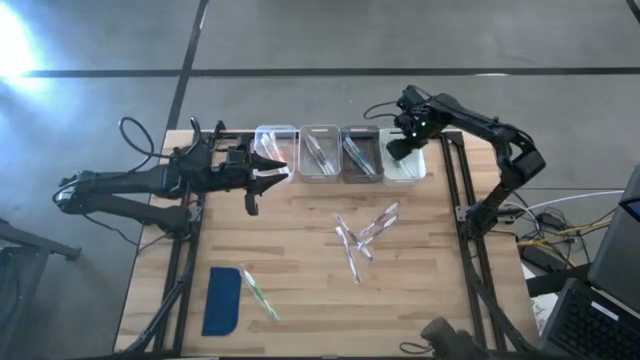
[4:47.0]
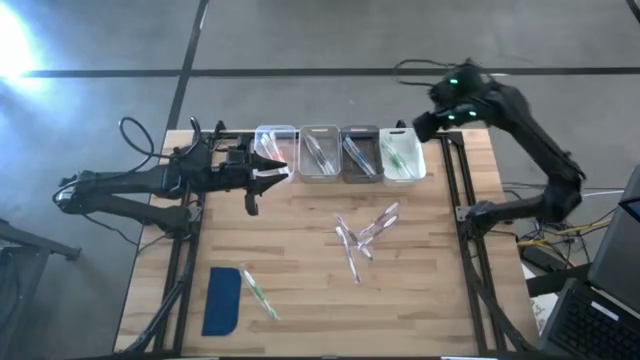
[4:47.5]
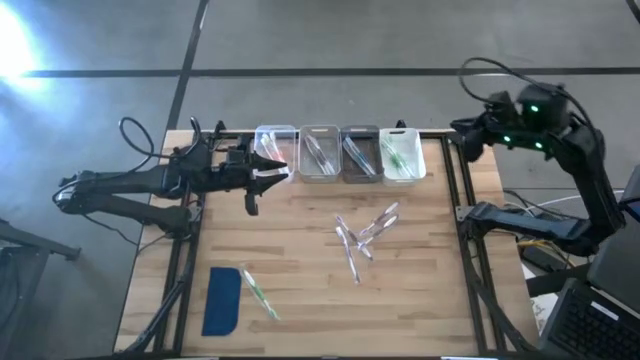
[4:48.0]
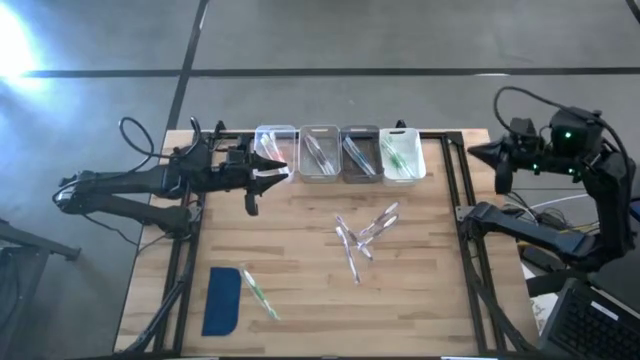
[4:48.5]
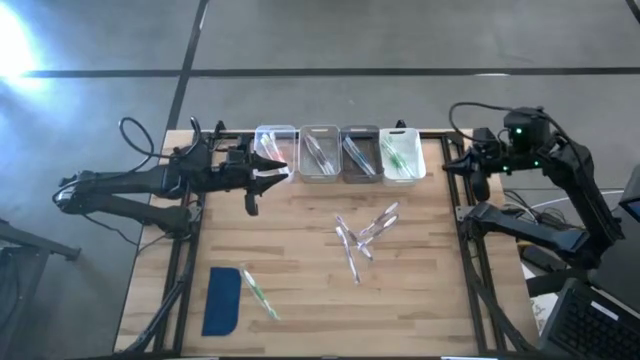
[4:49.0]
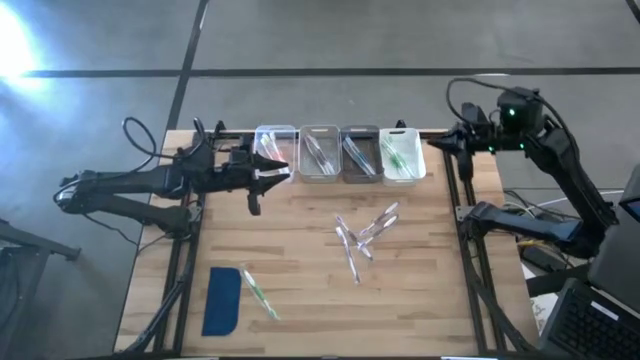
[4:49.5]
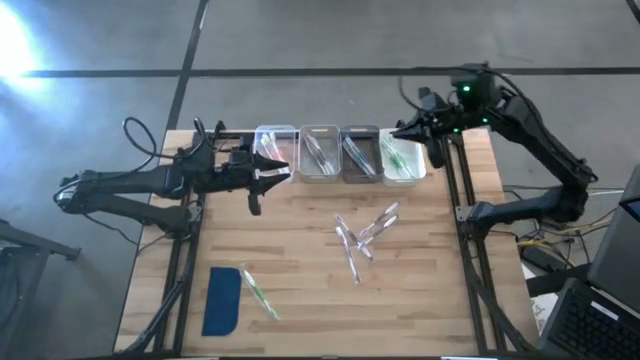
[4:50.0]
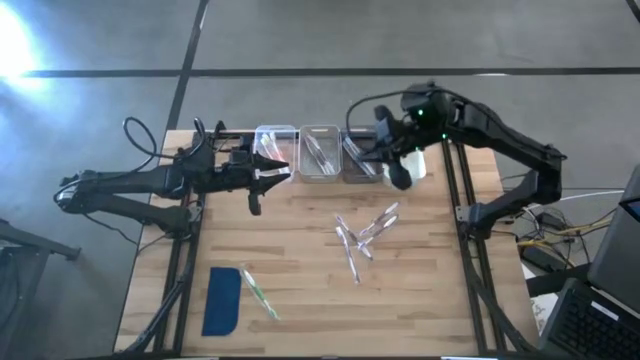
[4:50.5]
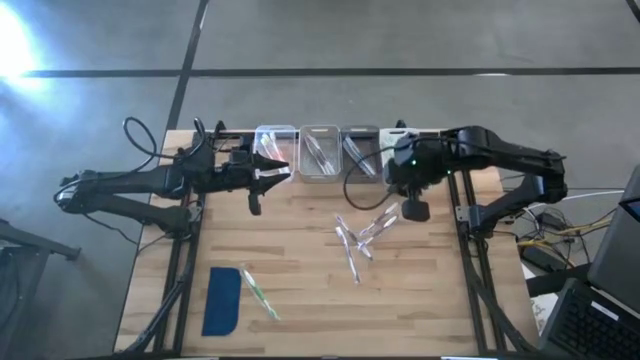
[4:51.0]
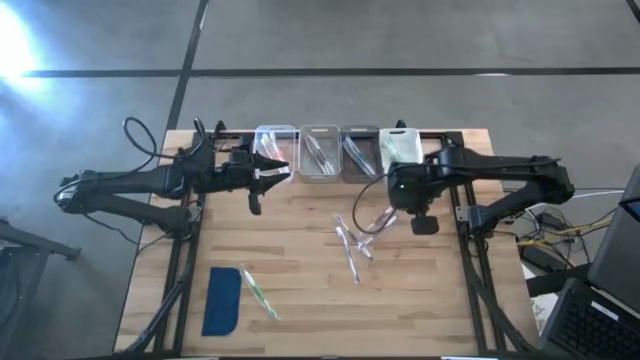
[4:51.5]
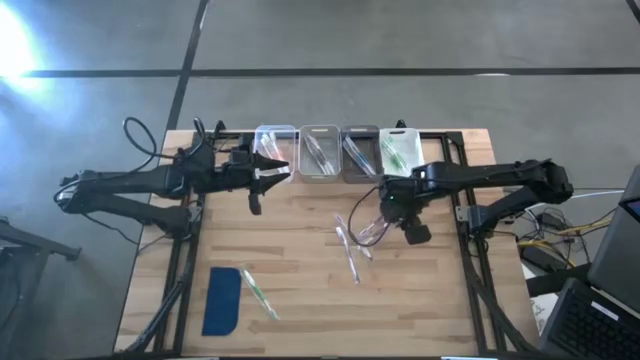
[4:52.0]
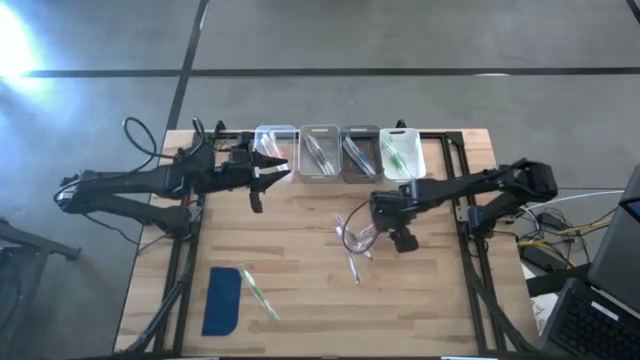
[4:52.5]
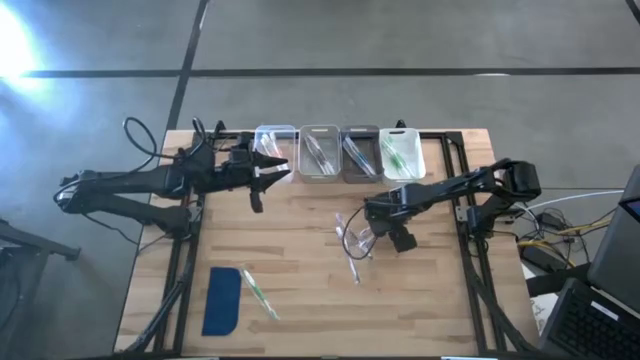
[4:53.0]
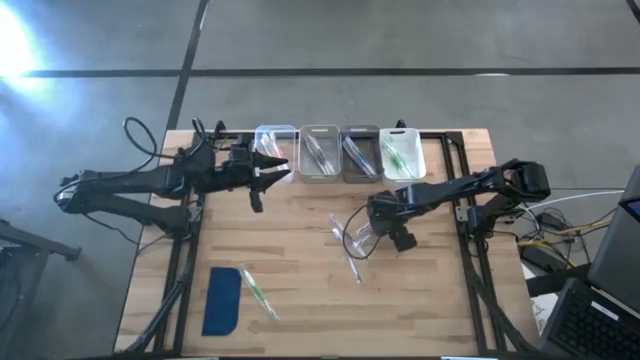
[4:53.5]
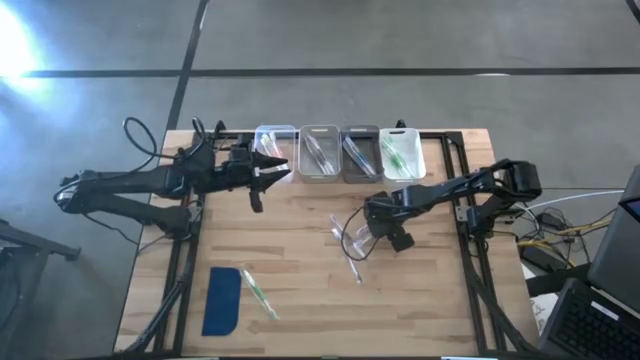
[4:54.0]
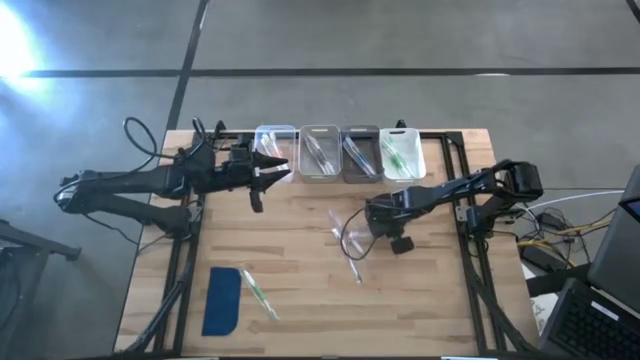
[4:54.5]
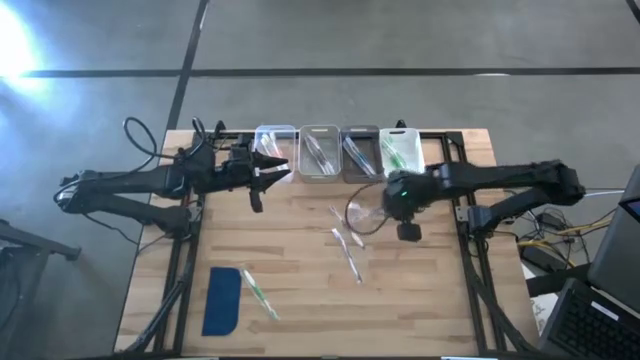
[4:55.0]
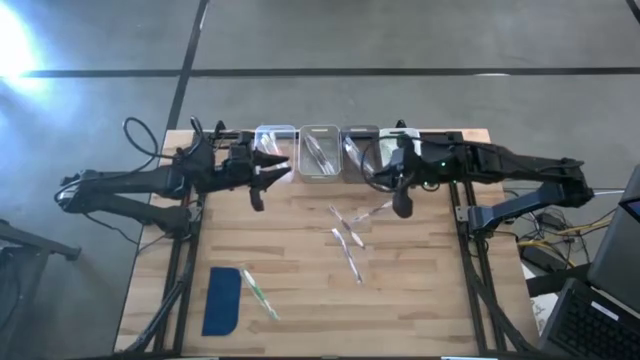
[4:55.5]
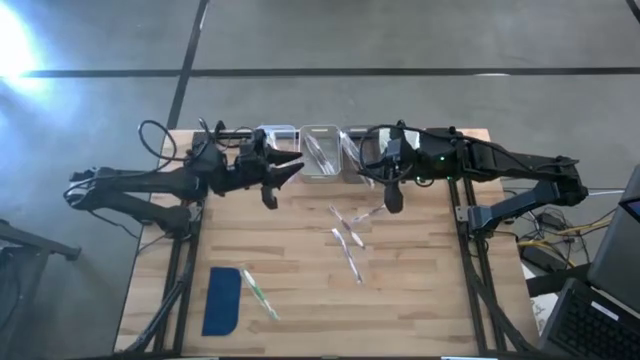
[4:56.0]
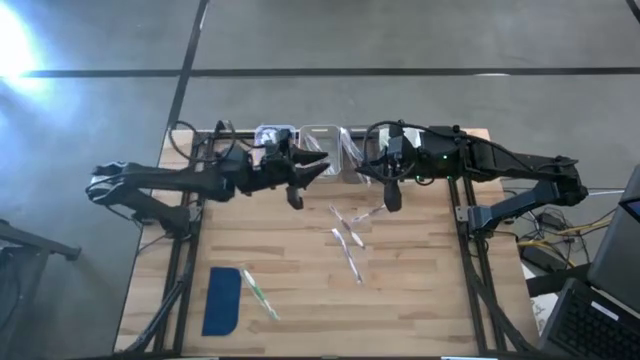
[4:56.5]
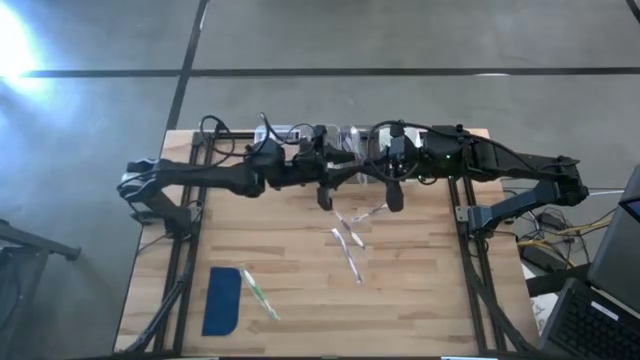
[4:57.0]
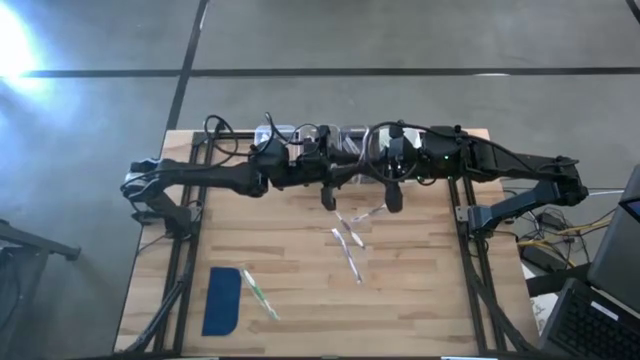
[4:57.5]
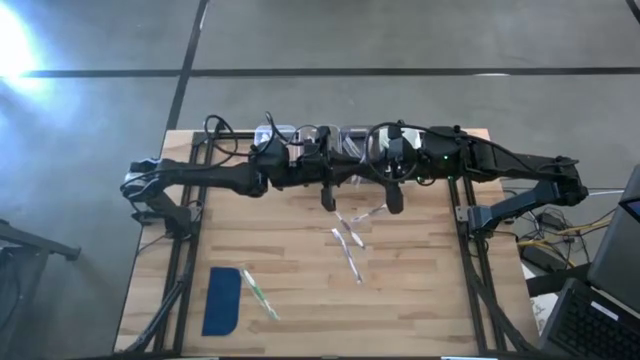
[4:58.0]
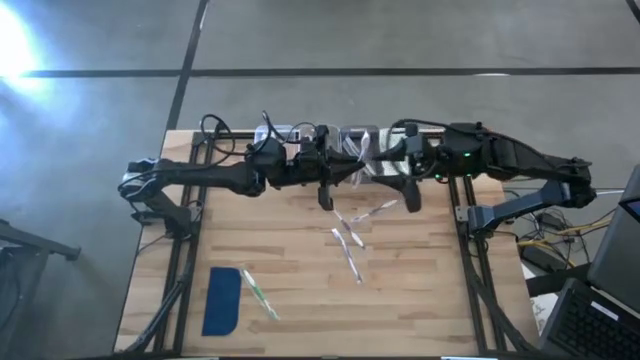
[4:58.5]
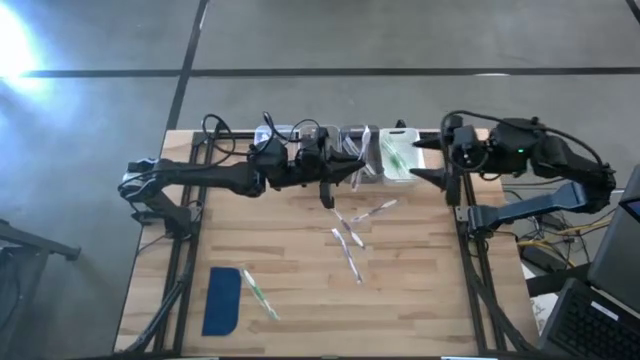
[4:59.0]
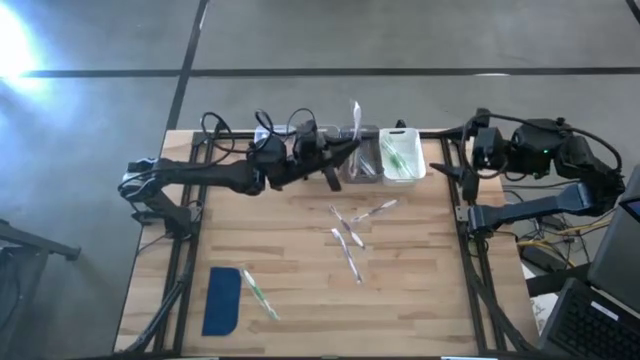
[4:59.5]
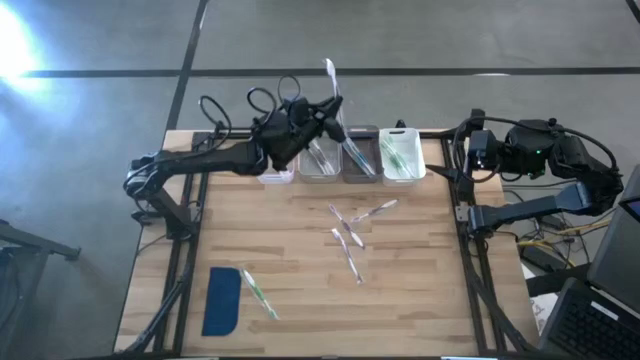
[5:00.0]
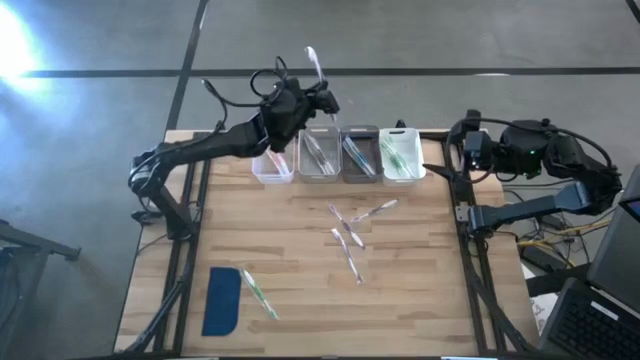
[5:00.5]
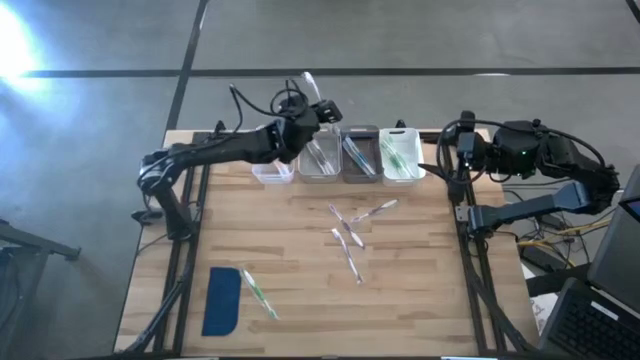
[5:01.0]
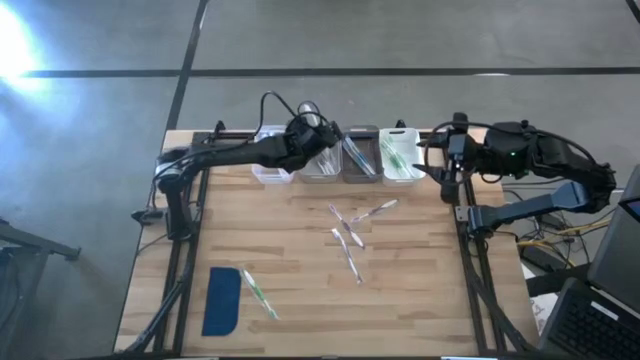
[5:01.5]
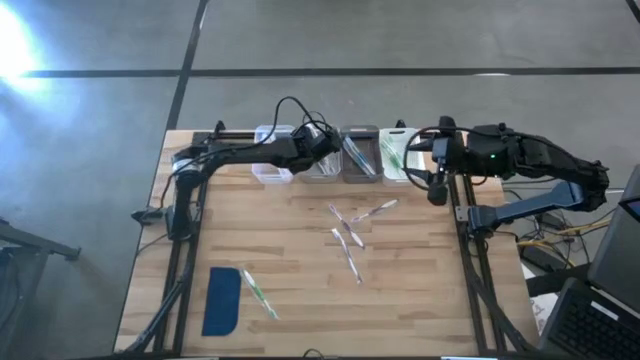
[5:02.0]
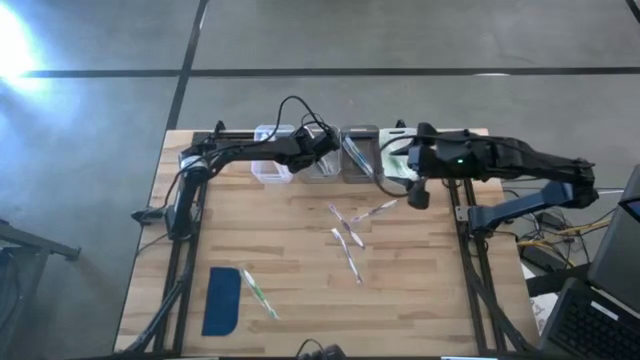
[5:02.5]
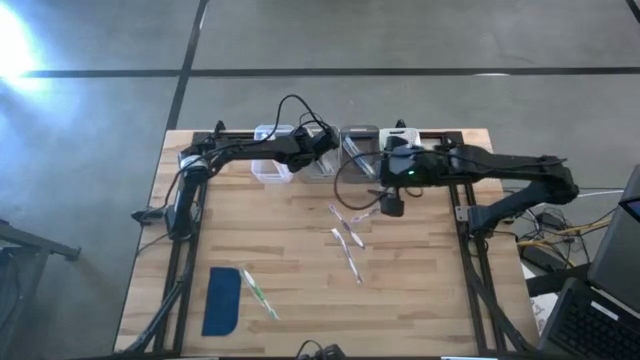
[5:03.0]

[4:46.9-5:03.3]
Task: Pick & Place Toothbrushes
Put the purple toothbrush into the gray bin

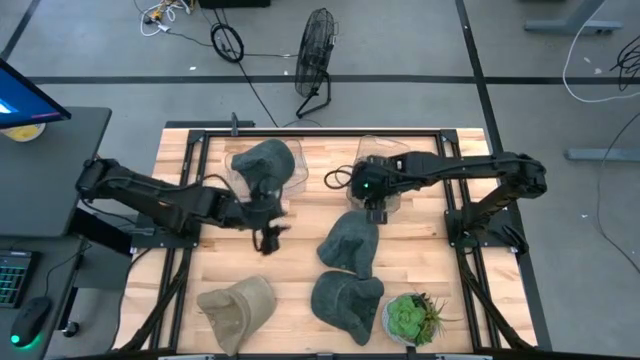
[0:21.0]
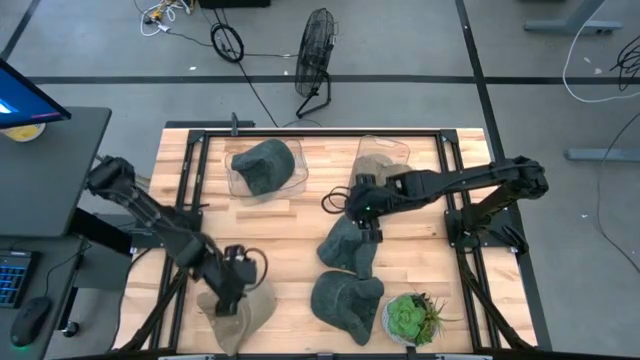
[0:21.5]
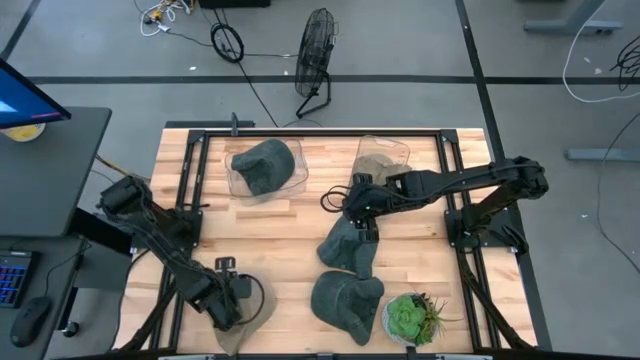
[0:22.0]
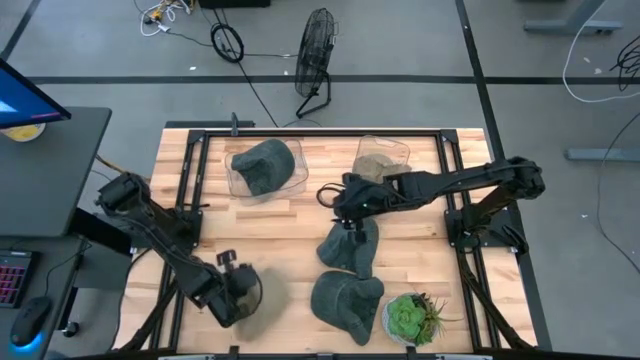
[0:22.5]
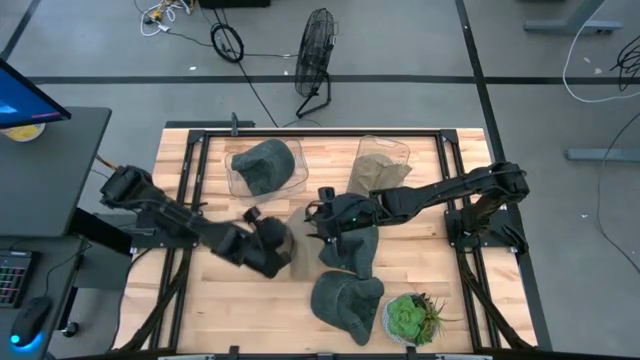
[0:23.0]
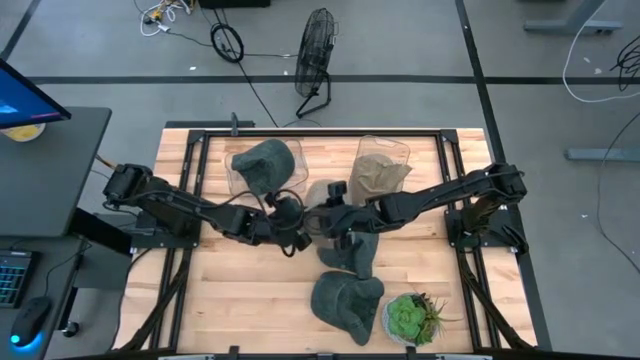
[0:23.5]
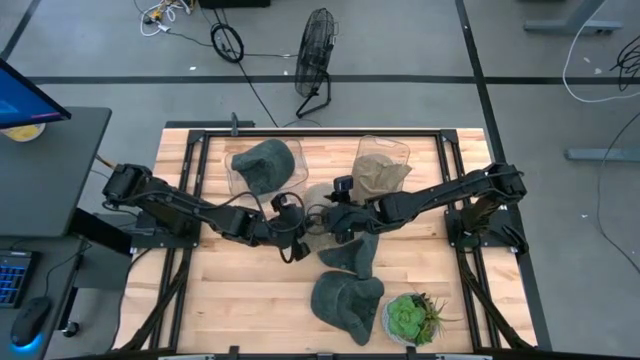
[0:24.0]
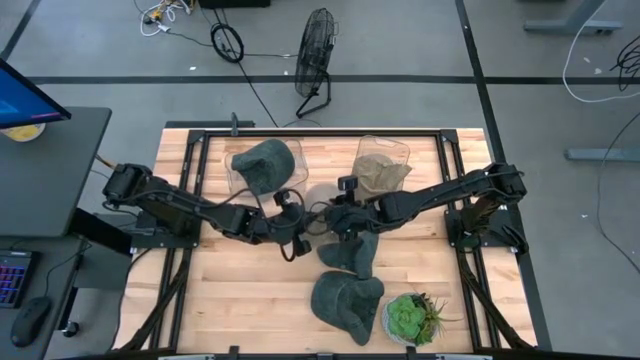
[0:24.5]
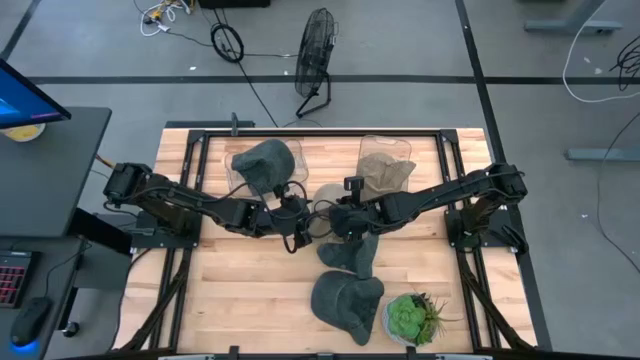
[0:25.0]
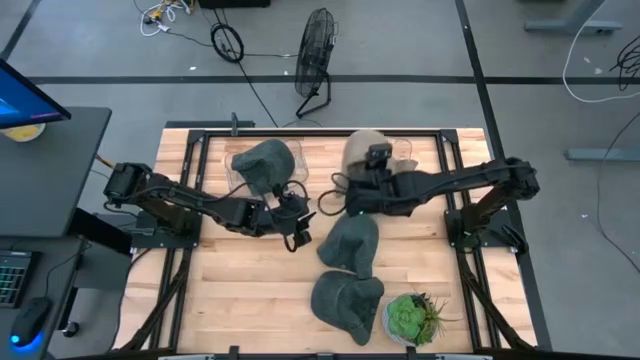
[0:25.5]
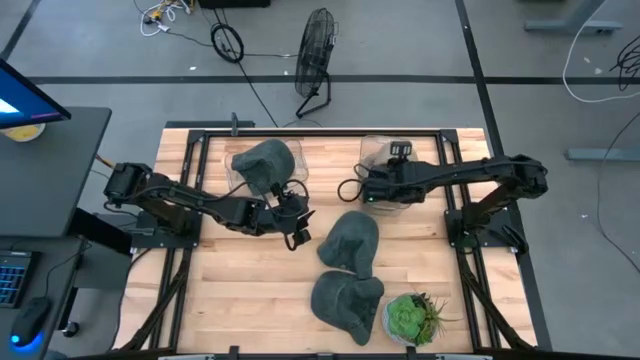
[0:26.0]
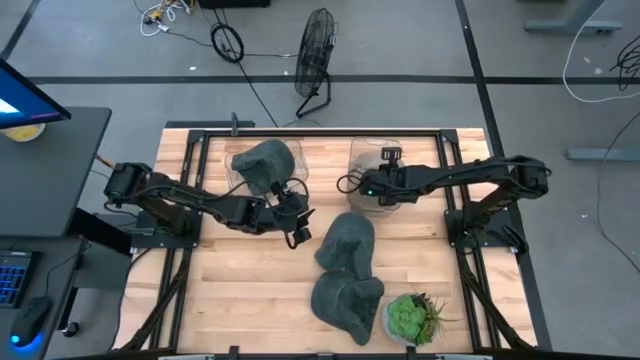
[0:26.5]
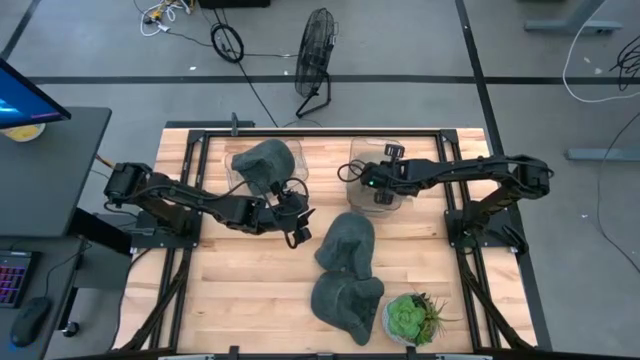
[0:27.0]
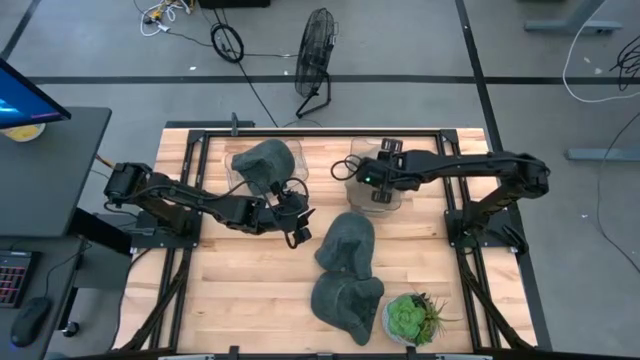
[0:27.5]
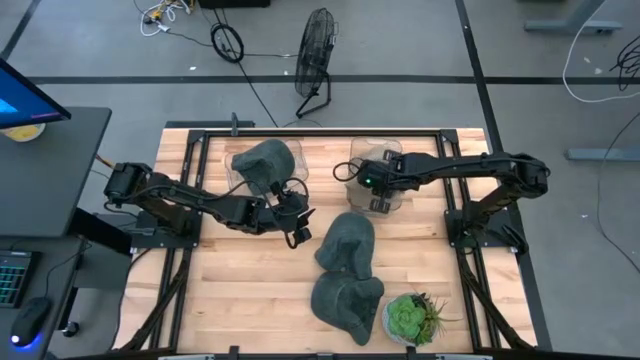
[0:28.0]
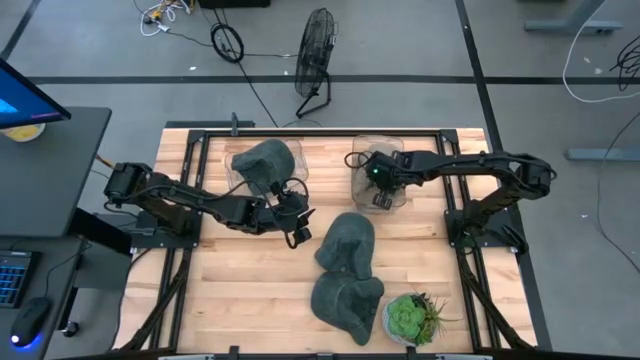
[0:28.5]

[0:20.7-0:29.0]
Task: Pick & Place hat
Put the brown cap into the right transparent bin
